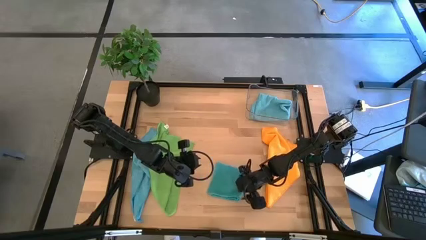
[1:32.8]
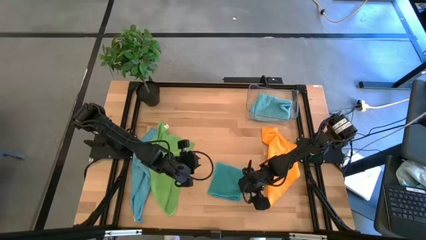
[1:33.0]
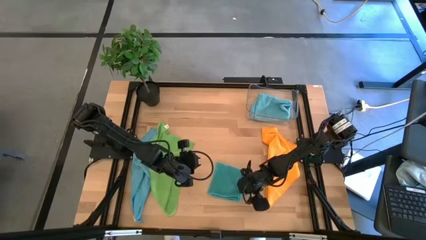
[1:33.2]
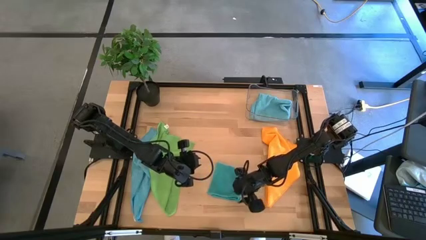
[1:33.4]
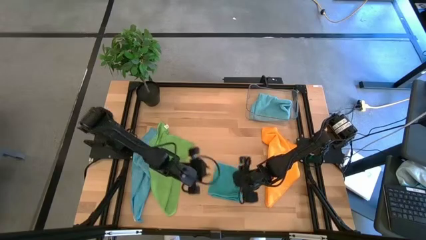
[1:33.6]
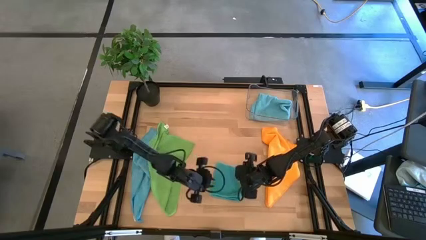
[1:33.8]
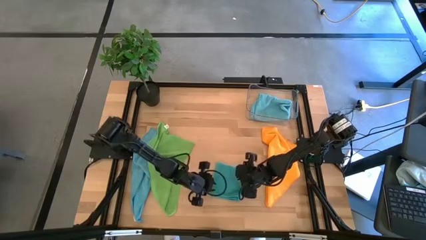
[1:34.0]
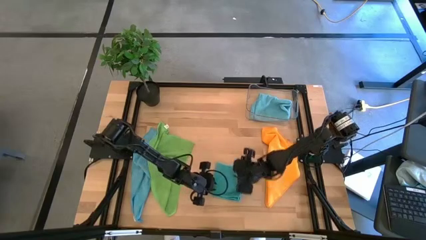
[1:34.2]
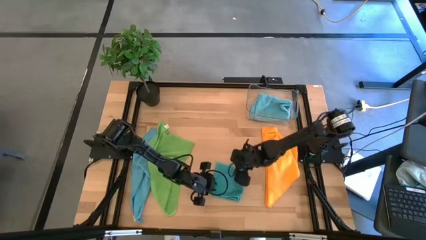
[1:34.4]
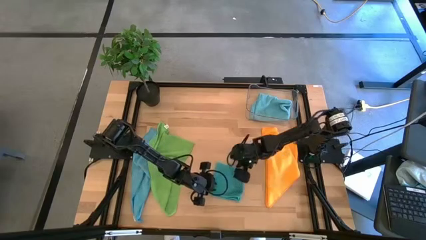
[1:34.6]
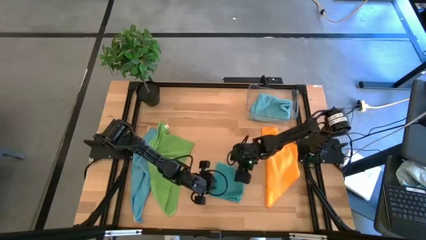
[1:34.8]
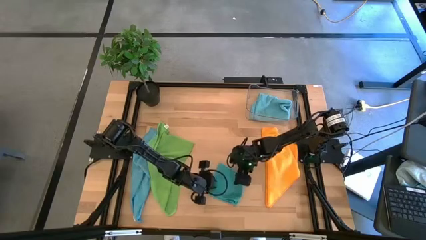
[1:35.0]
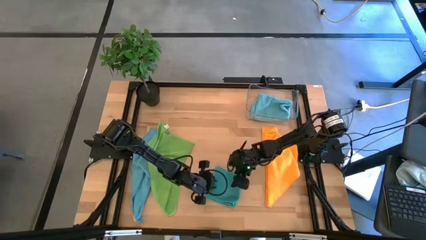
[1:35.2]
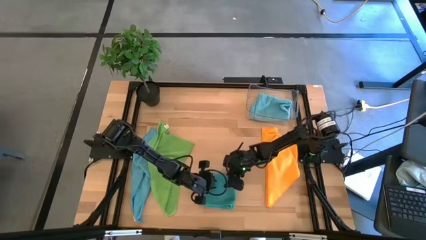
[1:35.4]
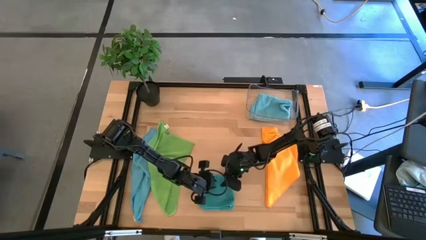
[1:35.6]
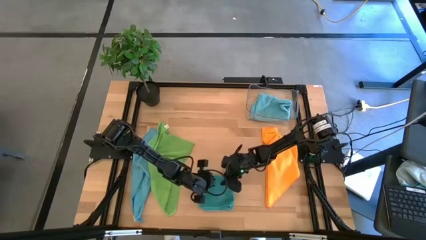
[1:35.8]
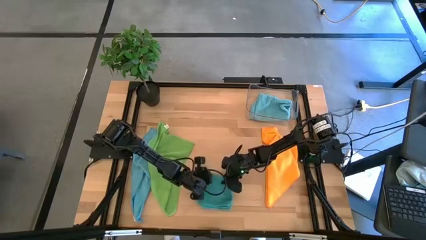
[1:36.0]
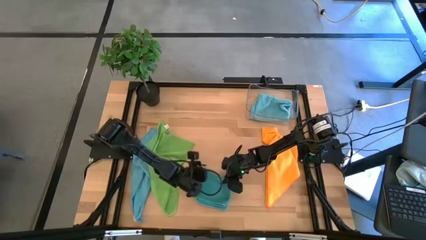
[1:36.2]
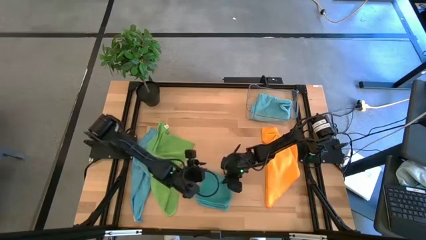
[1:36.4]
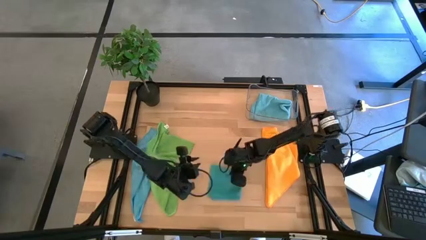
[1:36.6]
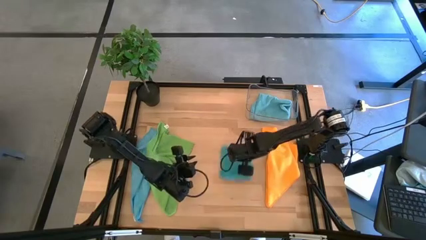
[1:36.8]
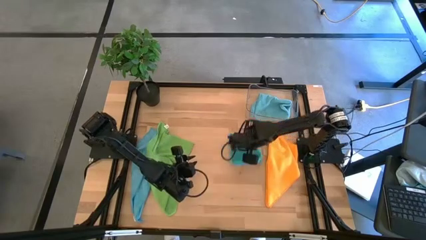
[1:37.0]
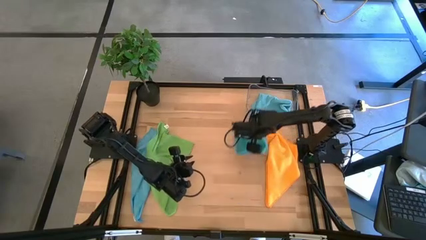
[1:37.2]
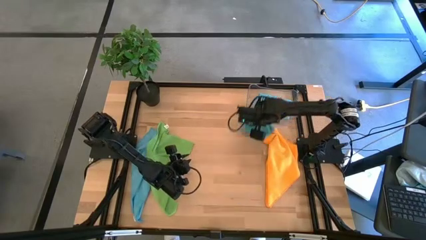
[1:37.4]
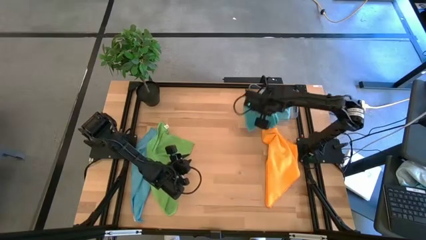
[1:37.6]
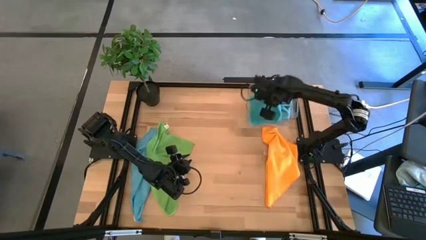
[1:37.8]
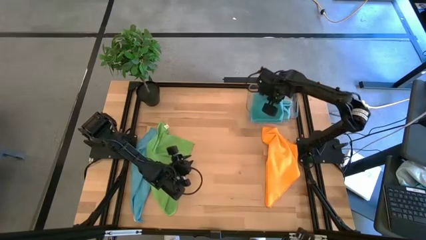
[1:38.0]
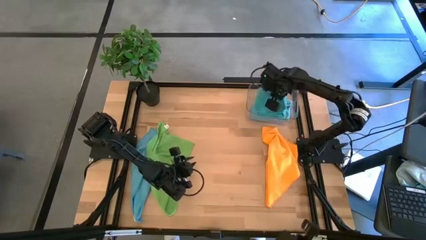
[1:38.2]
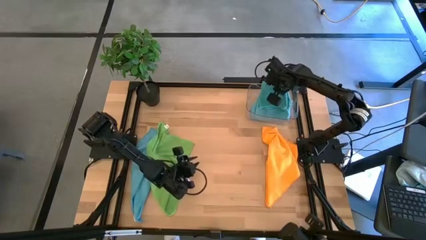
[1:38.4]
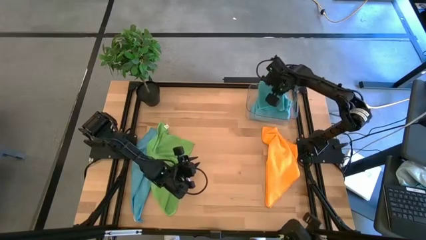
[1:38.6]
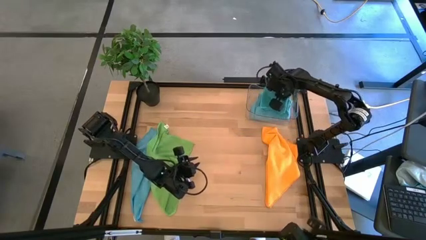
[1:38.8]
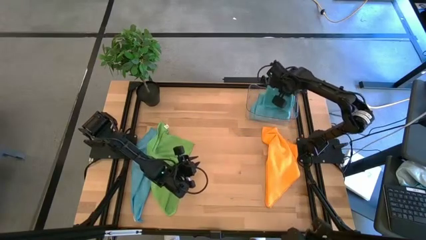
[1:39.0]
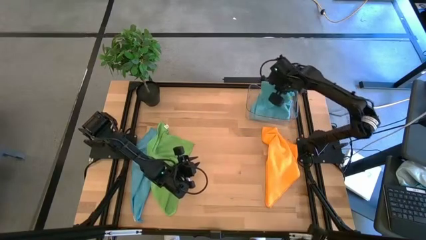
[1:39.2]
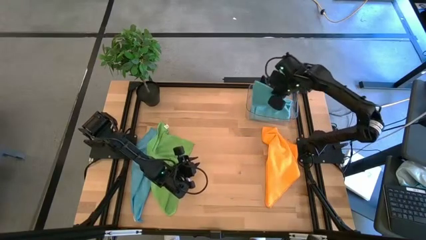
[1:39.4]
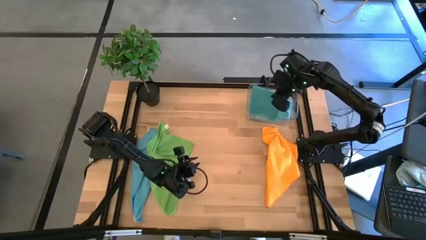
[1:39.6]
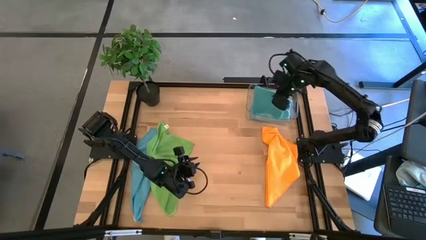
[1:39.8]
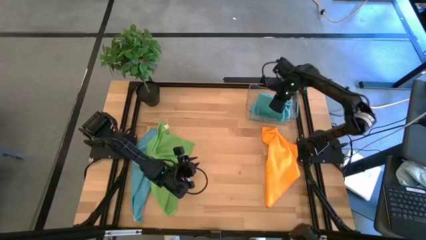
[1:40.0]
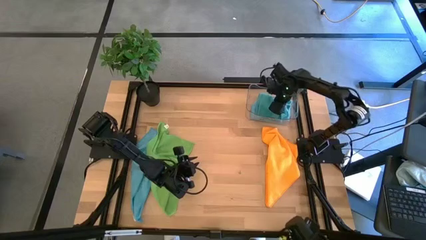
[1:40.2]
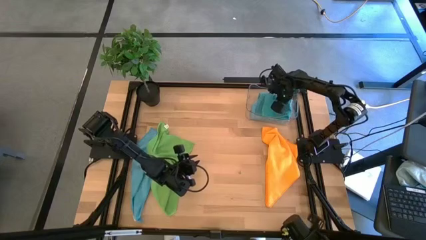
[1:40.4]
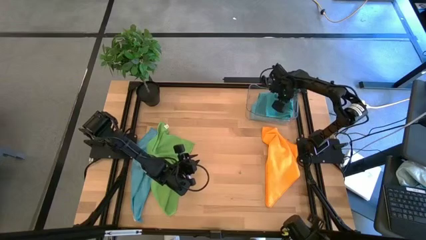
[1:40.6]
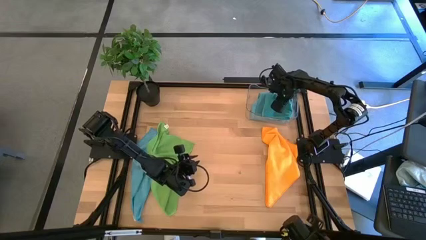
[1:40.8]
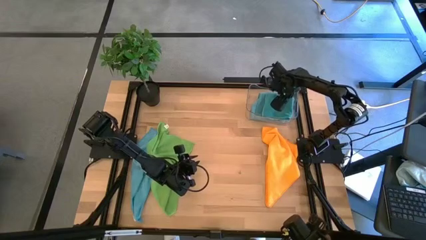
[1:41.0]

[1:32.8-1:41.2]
Task: Fold microfiber towels
Put the folded blue Fold the blue microfiber towel into the transparent bin

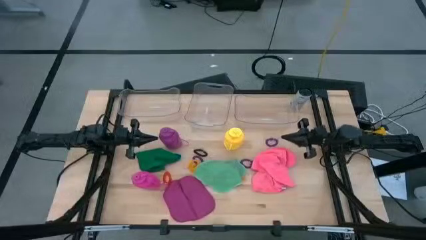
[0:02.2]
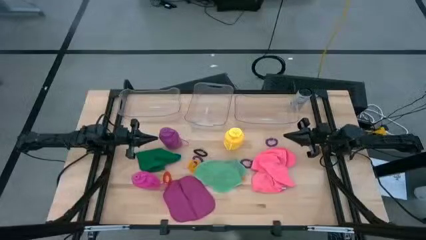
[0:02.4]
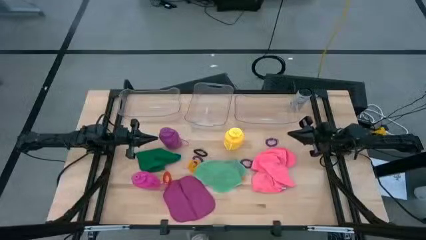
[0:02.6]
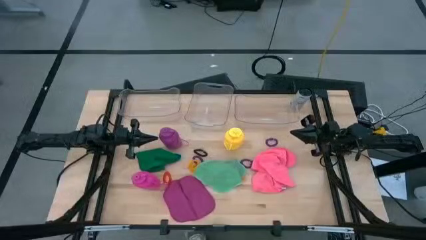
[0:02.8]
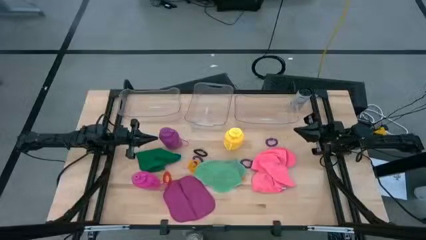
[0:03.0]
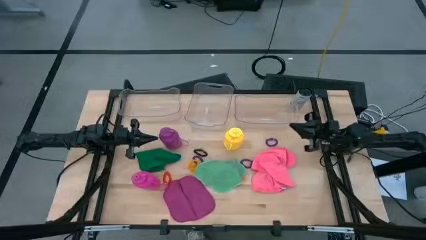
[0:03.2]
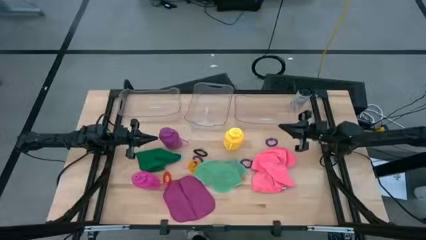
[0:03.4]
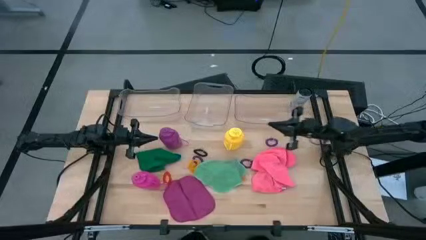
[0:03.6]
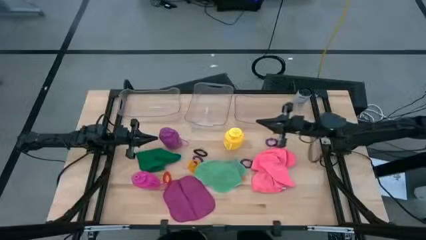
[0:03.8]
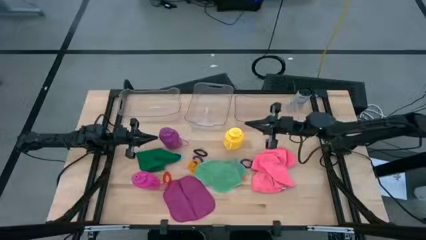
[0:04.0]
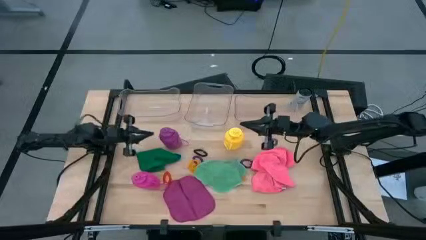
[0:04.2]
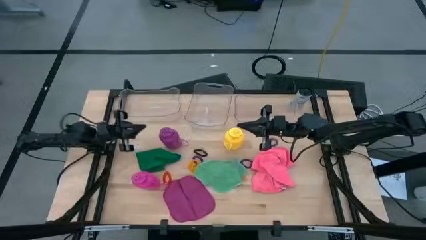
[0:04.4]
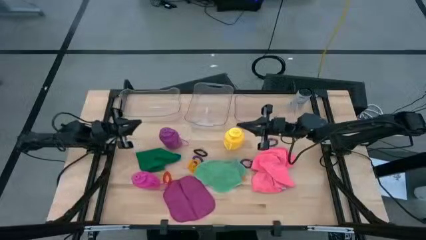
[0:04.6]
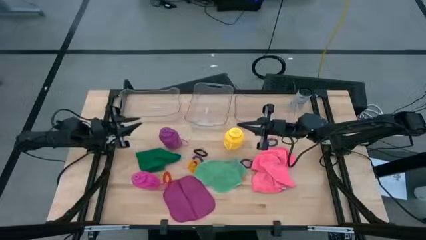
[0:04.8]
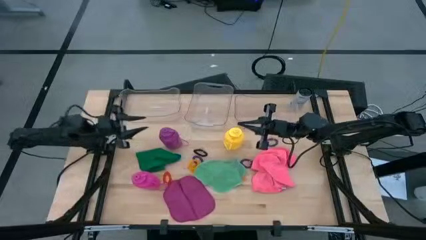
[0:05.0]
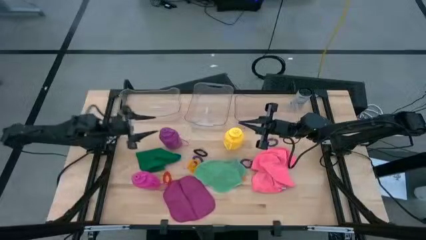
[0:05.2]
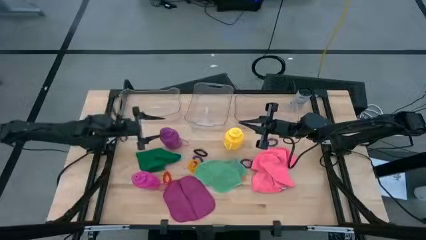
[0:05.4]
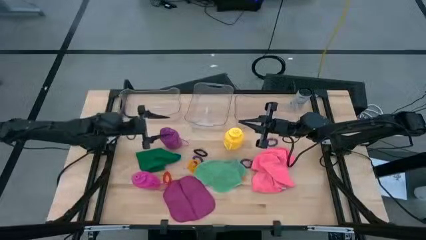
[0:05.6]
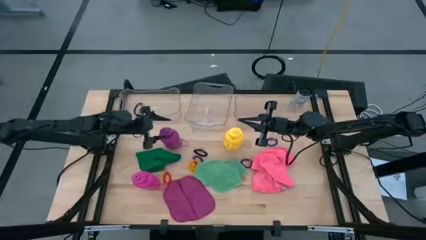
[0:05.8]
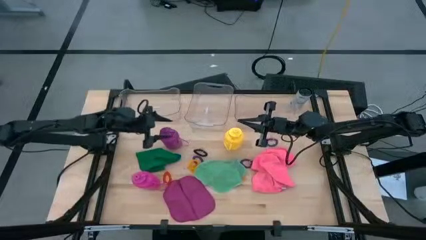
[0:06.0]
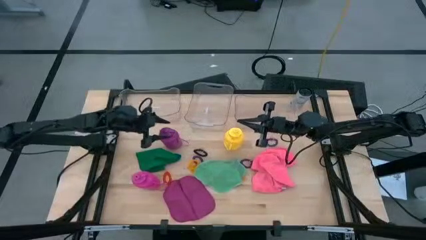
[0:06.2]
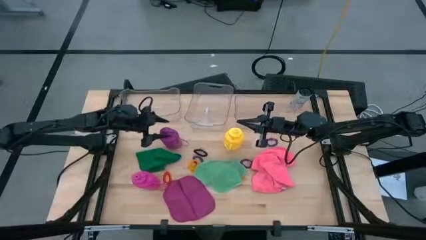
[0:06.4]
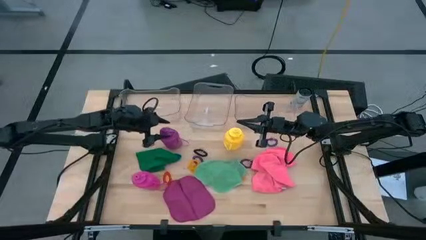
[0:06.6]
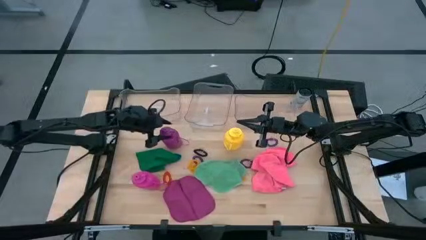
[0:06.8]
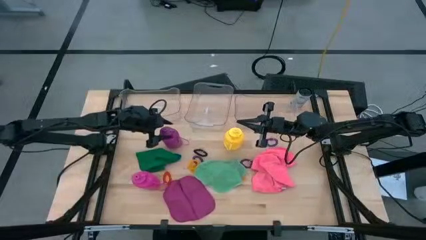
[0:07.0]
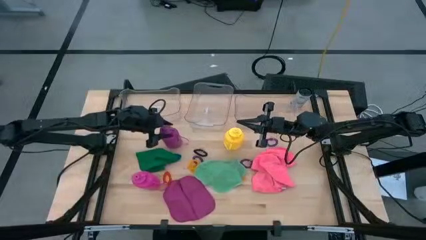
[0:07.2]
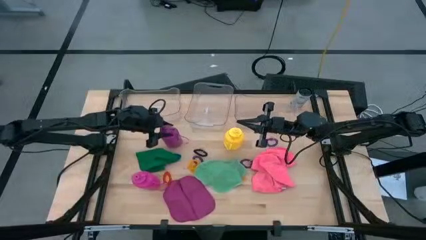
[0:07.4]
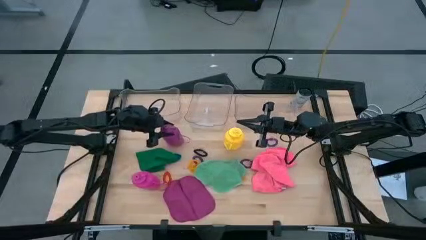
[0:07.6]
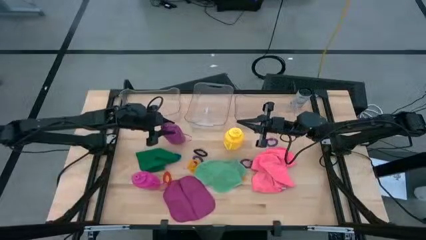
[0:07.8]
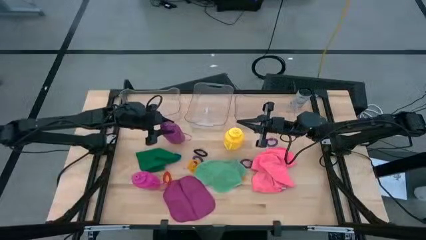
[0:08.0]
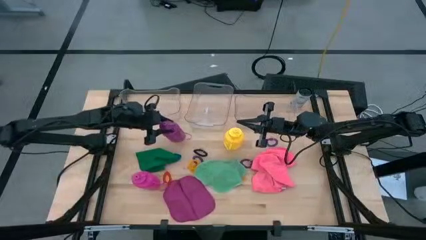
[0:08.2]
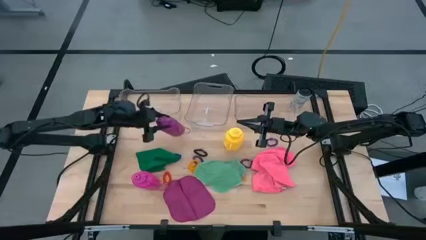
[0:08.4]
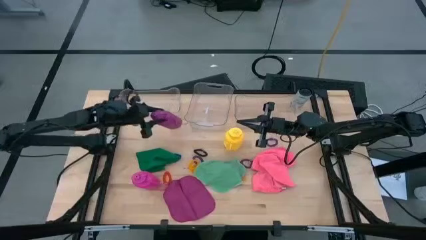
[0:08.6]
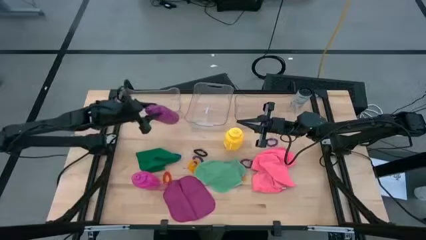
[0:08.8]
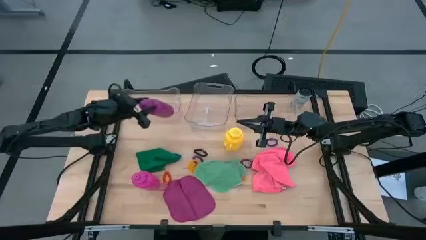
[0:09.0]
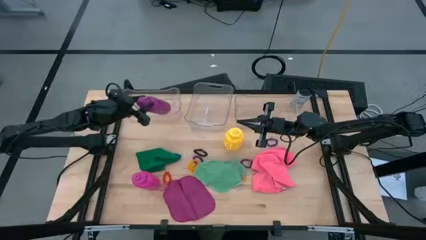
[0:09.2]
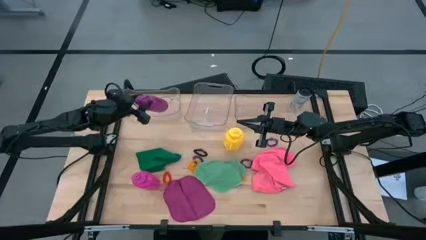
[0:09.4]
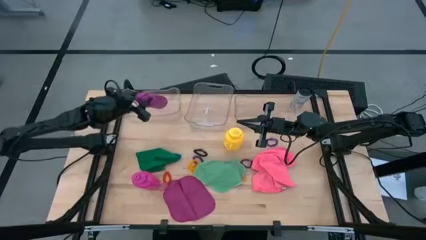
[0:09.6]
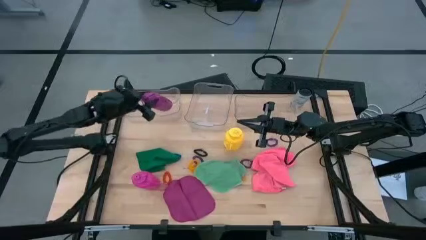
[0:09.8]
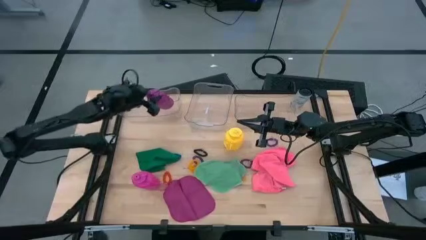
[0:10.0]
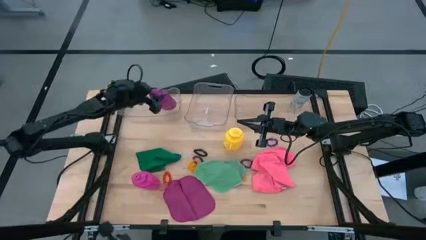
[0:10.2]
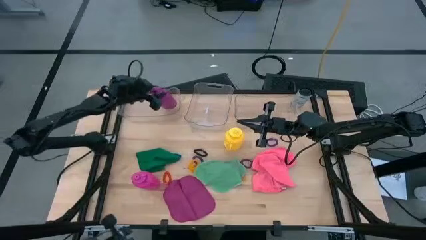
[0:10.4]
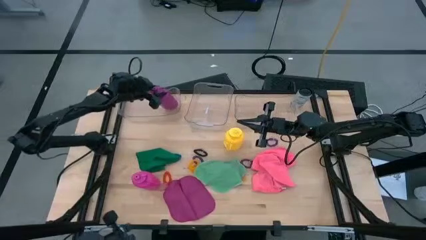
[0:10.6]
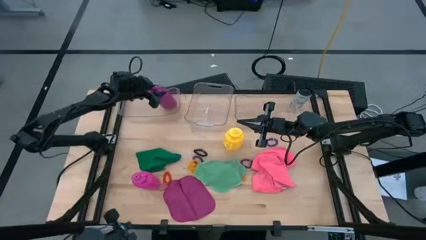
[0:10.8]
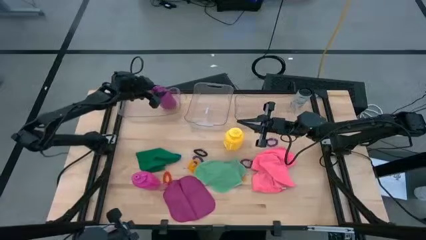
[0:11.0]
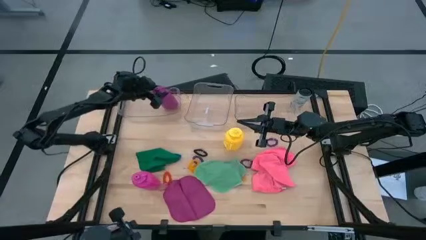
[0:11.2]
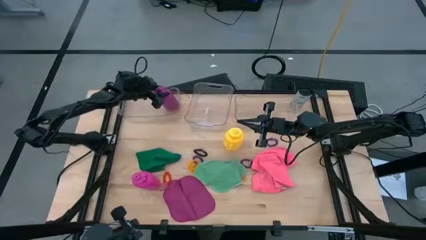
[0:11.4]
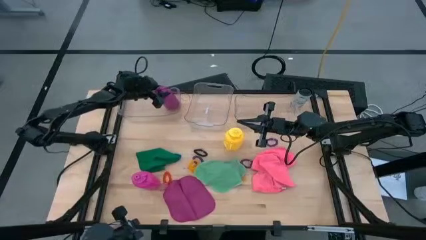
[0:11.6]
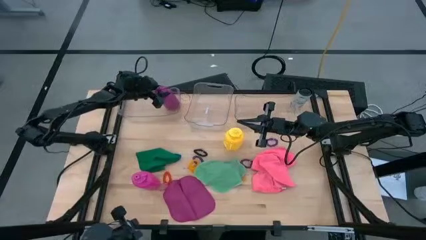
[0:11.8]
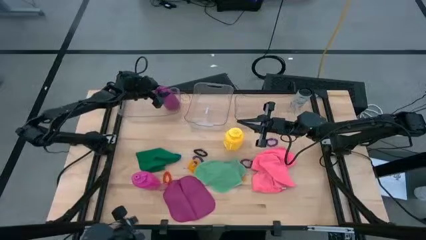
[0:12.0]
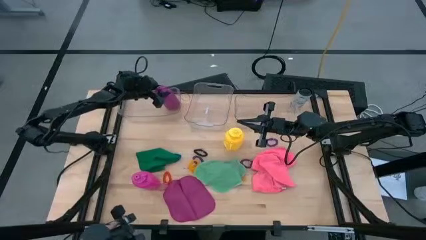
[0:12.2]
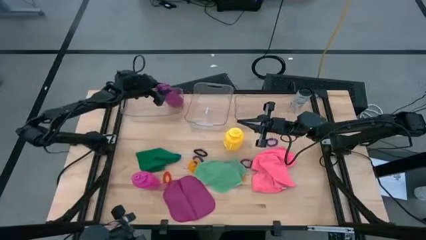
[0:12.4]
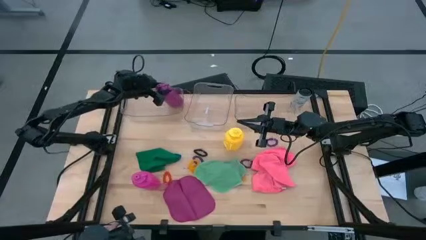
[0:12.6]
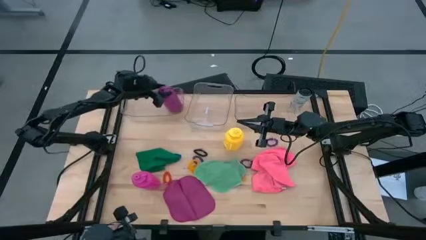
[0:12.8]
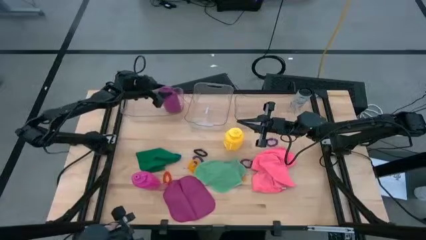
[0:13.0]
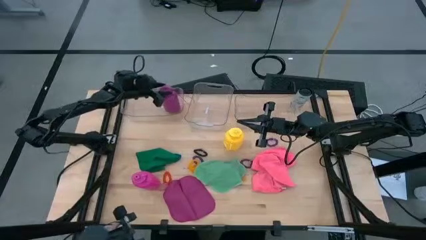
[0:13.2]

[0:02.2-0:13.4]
Task: Pick & Place Sports Items
Put the purple water bottle into the left transparent bin
